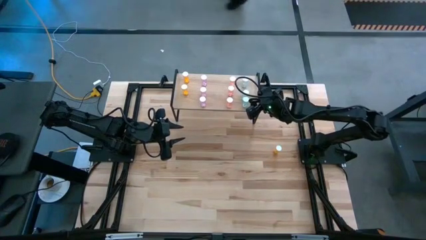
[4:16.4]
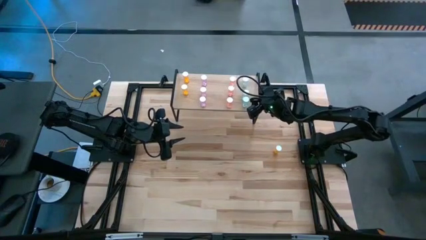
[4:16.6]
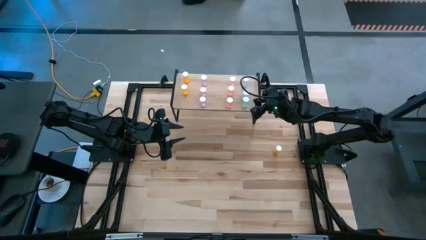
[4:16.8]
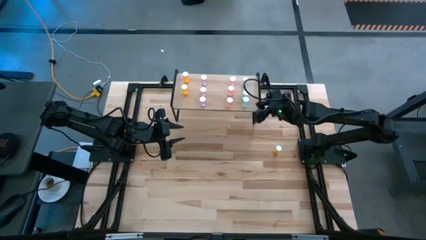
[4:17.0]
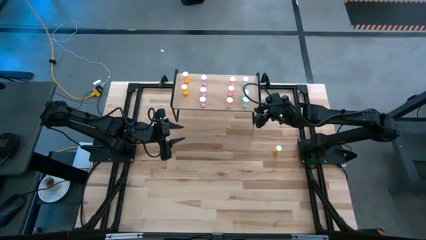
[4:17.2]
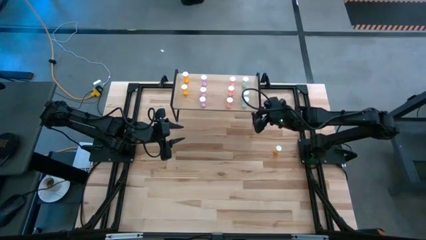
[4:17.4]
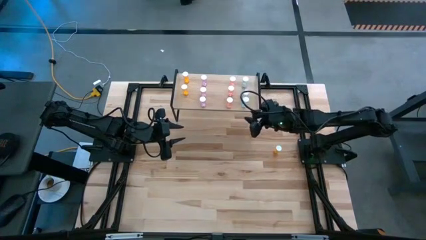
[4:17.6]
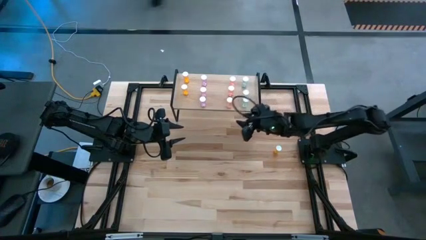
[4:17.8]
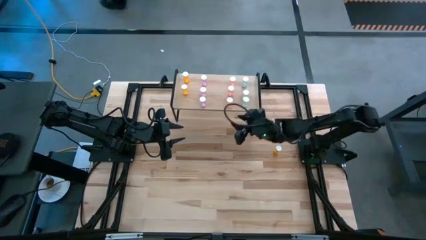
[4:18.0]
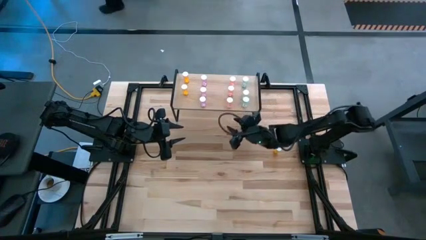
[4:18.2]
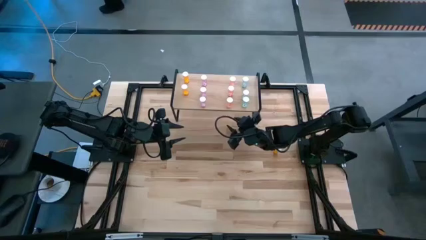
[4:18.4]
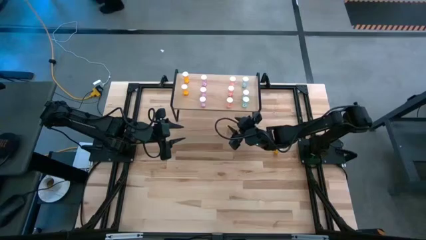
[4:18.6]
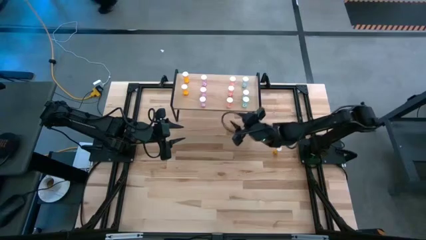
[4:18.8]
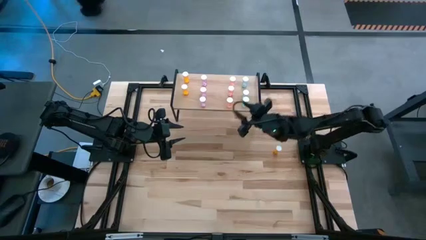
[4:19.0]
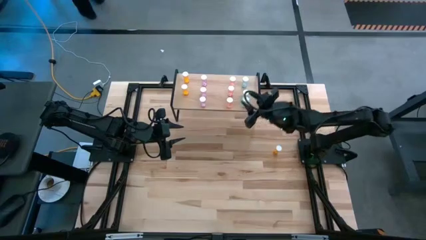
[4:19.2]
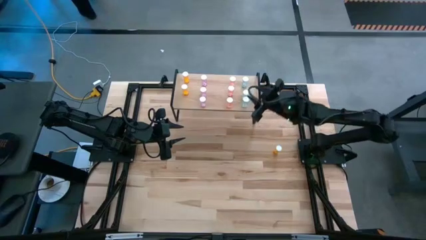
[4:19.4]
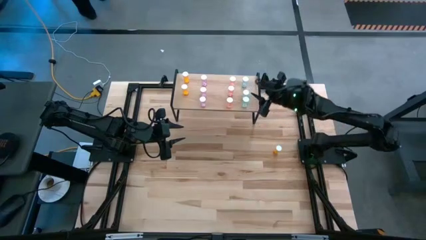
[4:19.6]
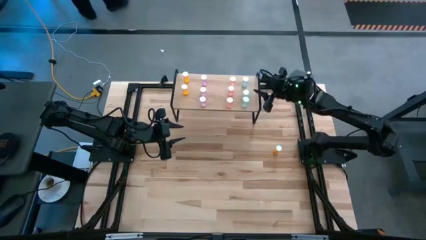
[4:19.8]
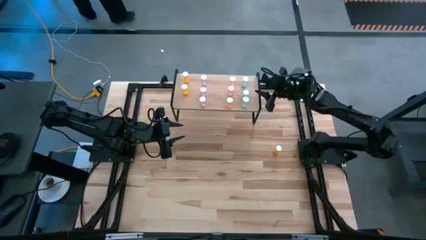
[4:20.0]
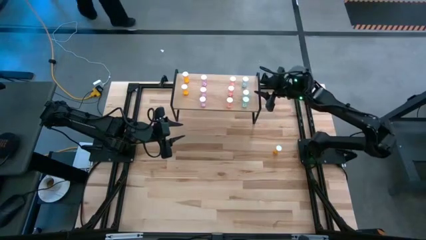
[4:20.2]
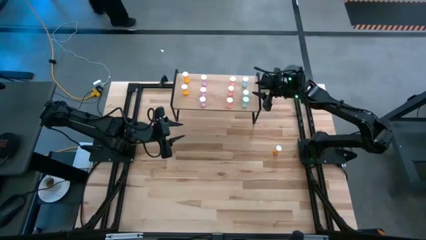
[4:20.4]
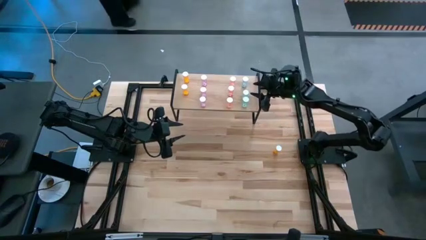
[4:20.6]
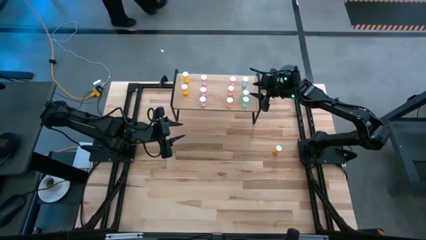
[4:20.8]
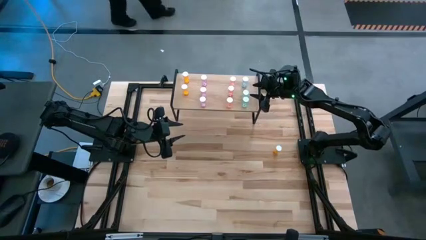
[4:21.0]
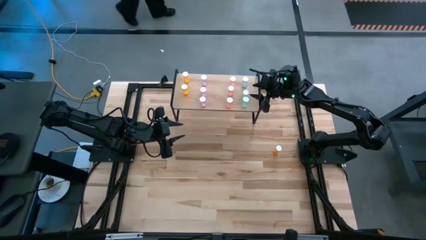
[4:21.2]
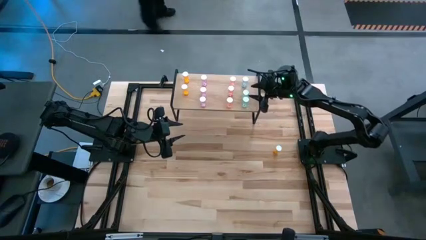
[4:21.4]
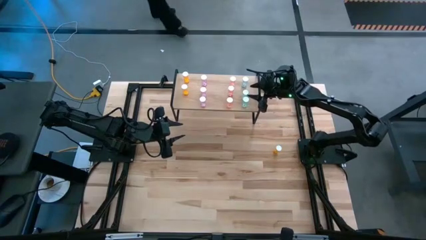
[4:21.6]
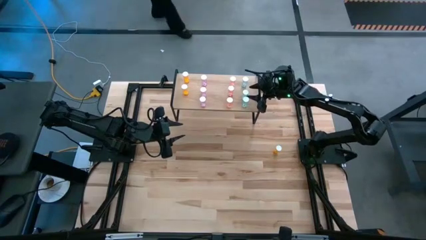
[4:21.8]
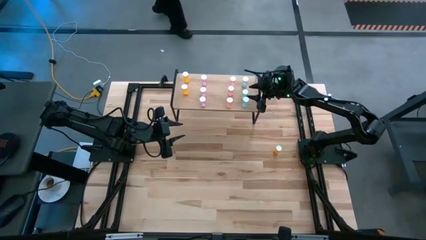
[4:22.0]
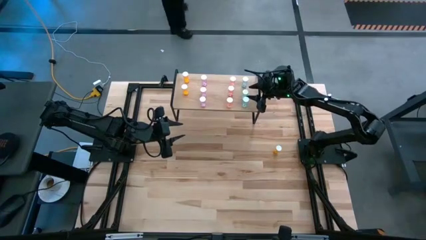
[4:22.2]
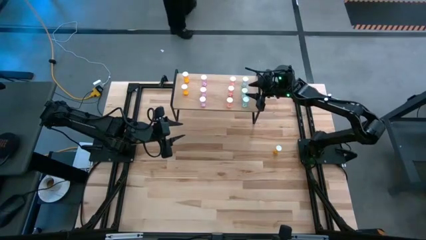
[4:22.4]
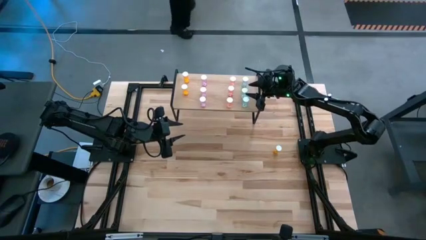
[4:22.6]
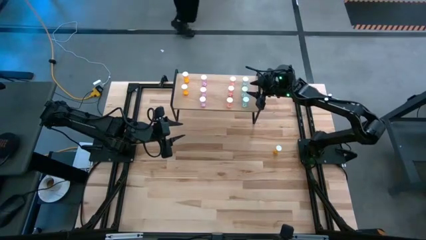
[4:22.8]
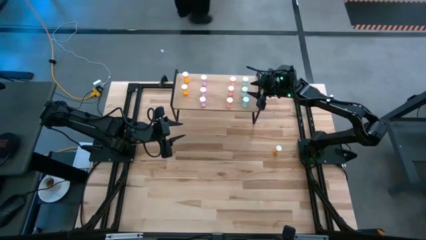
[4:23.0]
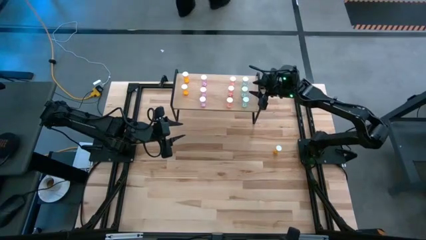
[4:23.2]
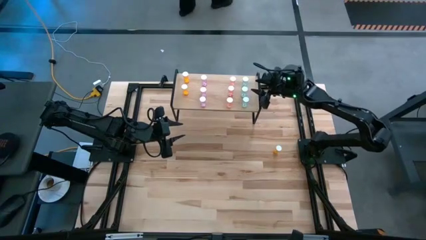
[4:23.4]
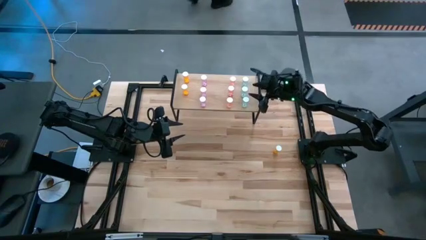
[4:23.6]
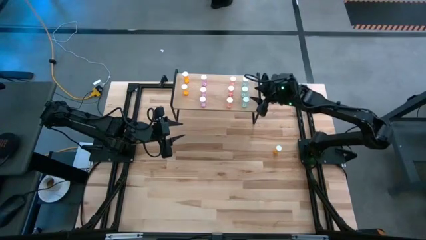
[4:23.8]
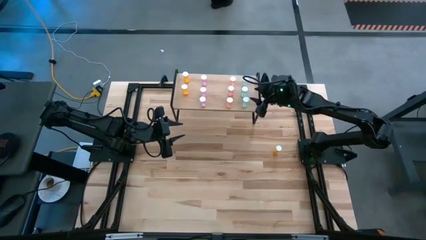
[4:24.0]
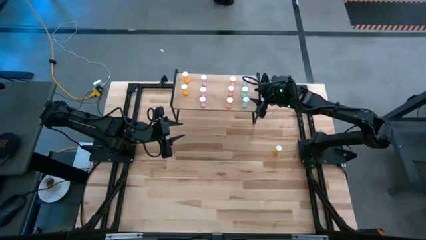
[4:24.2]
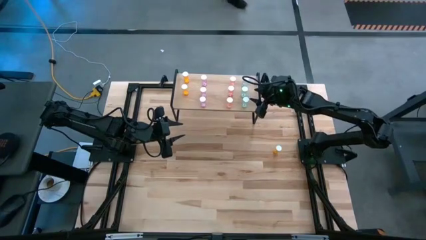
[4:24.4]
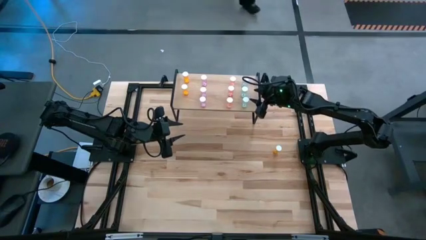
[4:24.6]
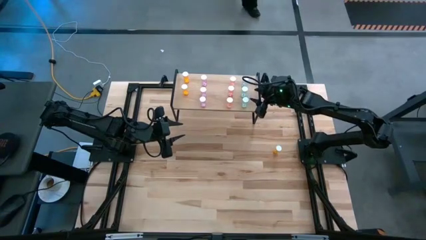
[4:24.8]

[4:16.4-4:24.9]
Task: Pick and place medicine bottles onto shelf by color
Adjust the blue pill bottles on the shelf

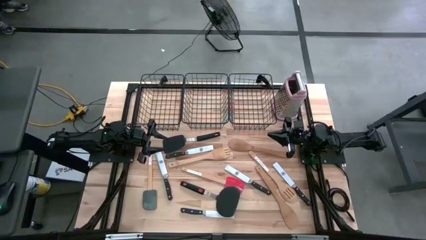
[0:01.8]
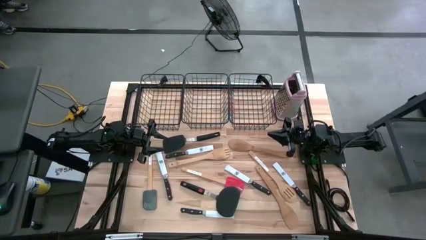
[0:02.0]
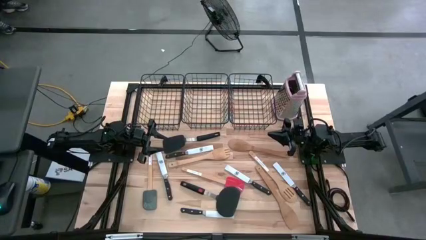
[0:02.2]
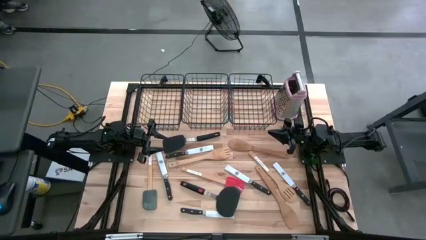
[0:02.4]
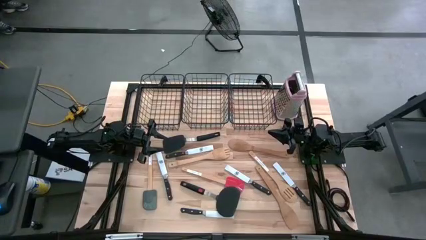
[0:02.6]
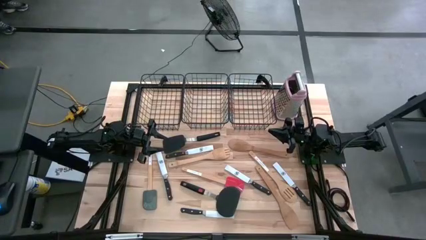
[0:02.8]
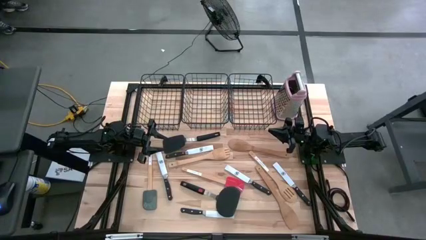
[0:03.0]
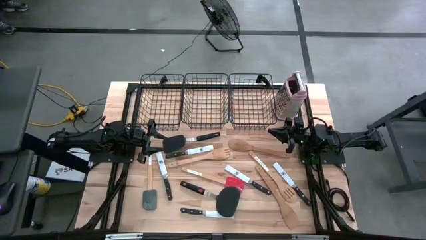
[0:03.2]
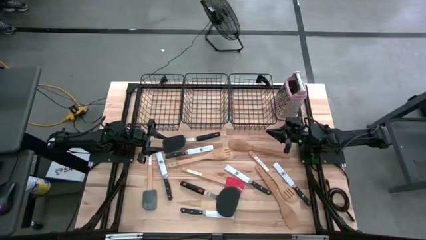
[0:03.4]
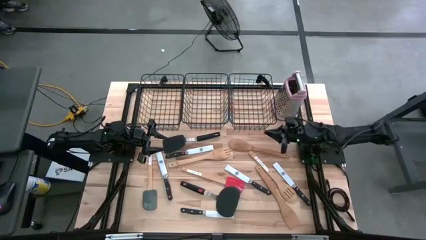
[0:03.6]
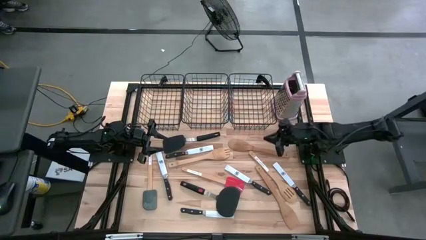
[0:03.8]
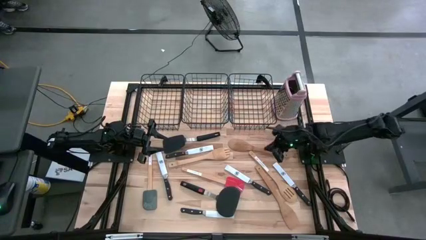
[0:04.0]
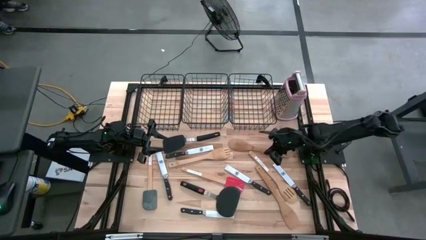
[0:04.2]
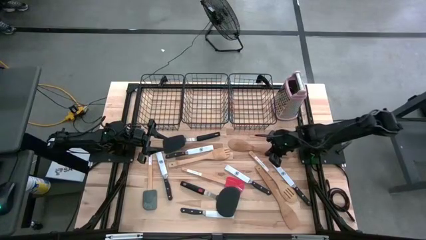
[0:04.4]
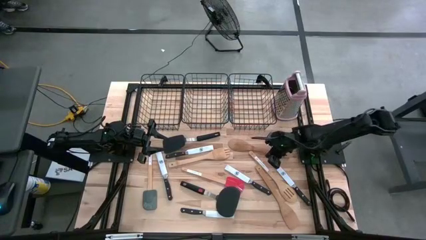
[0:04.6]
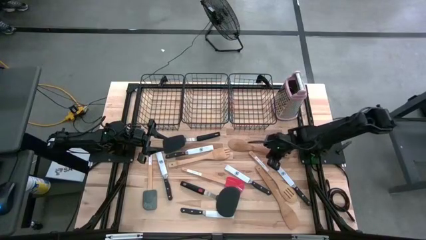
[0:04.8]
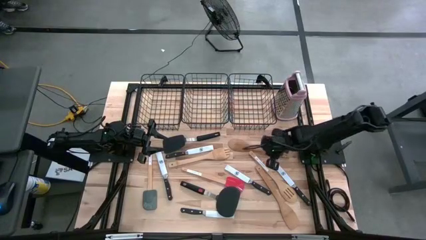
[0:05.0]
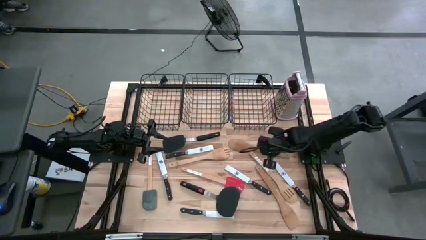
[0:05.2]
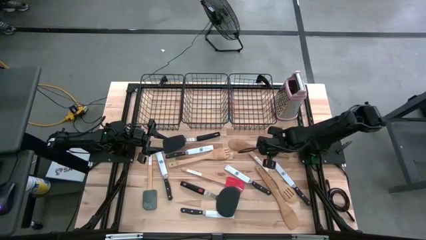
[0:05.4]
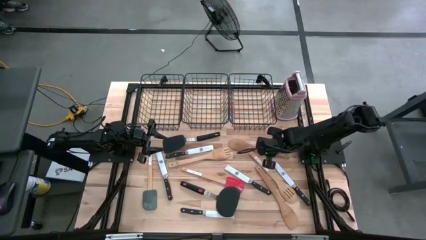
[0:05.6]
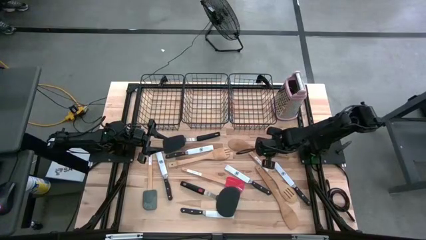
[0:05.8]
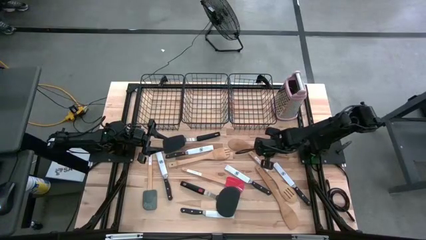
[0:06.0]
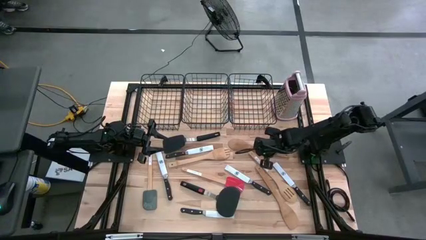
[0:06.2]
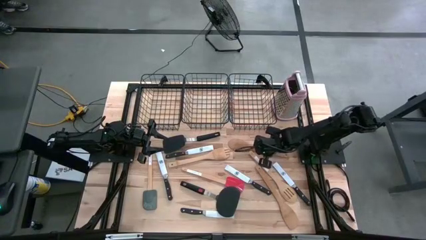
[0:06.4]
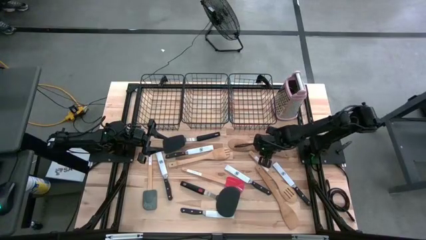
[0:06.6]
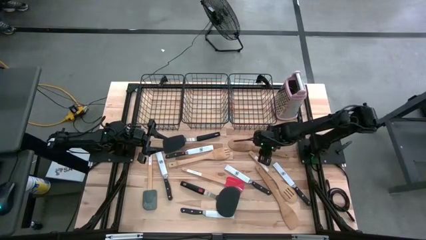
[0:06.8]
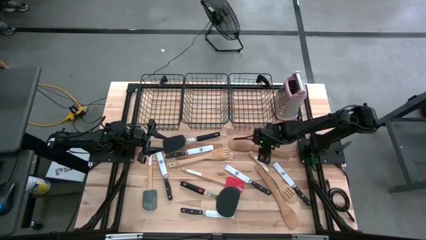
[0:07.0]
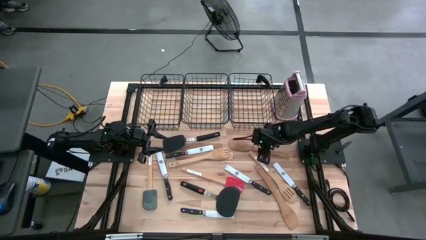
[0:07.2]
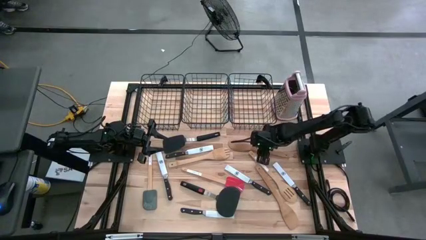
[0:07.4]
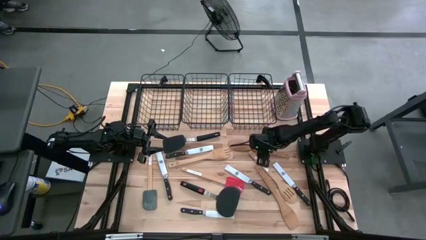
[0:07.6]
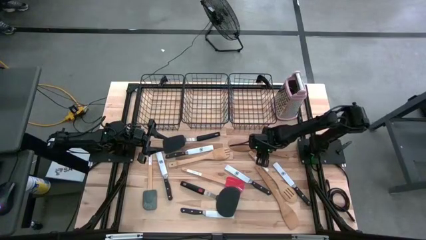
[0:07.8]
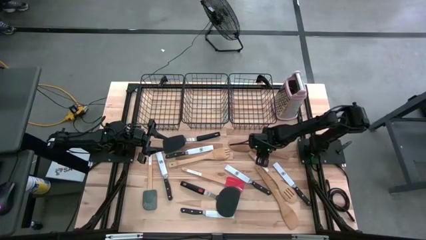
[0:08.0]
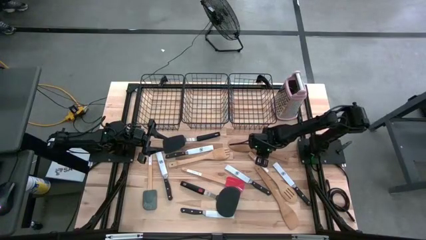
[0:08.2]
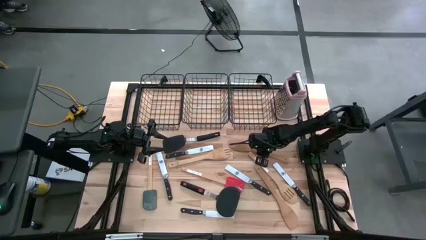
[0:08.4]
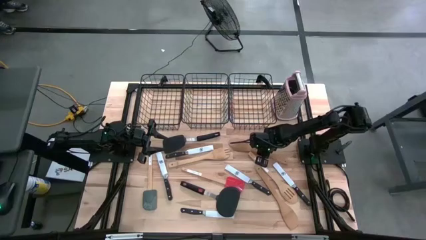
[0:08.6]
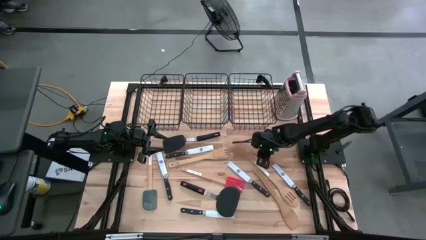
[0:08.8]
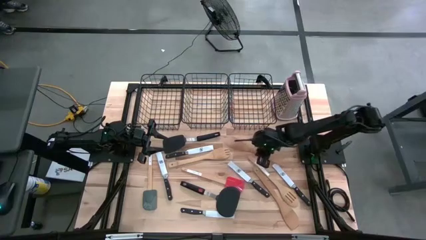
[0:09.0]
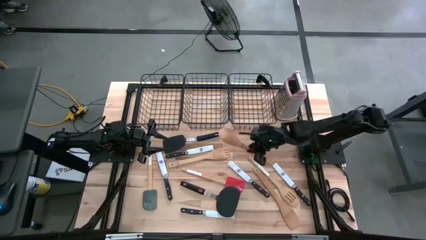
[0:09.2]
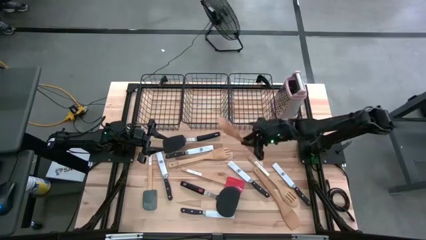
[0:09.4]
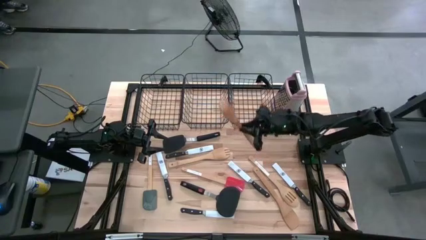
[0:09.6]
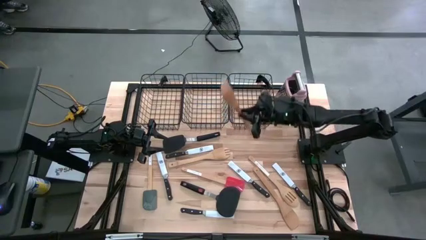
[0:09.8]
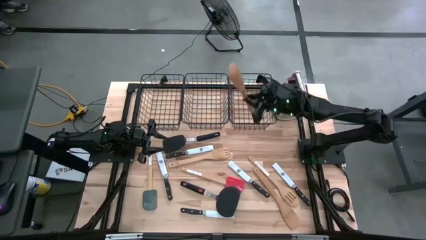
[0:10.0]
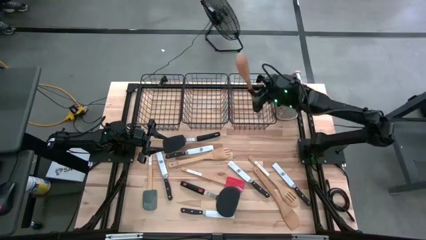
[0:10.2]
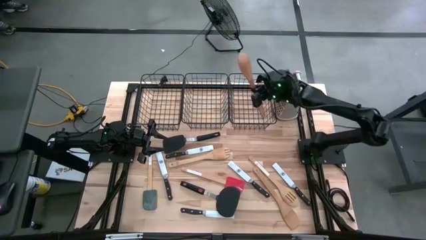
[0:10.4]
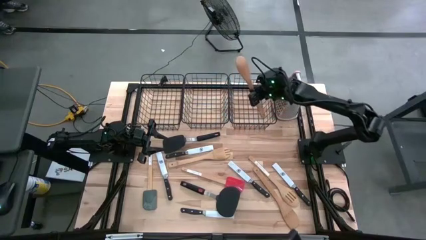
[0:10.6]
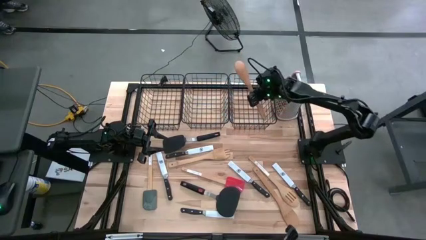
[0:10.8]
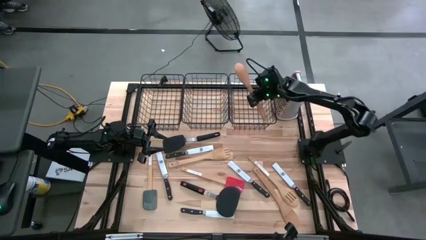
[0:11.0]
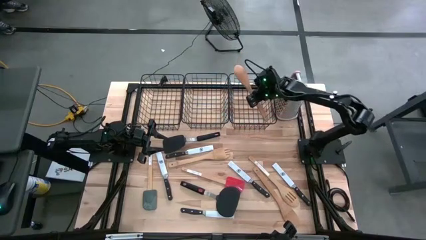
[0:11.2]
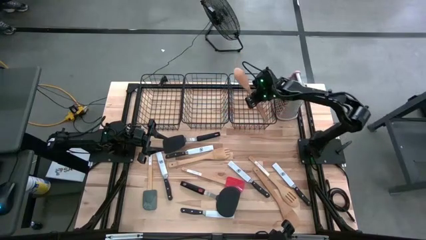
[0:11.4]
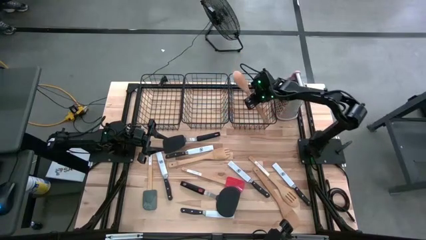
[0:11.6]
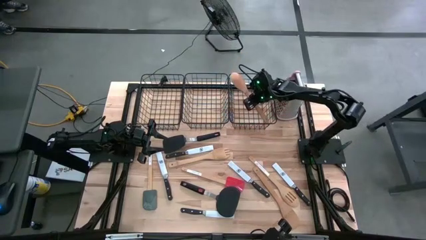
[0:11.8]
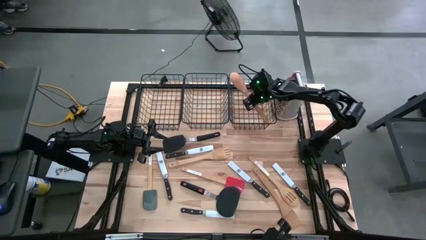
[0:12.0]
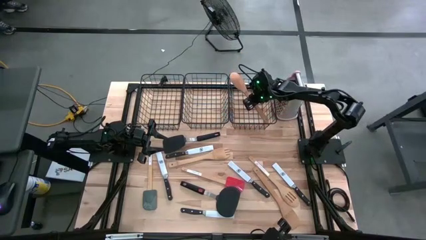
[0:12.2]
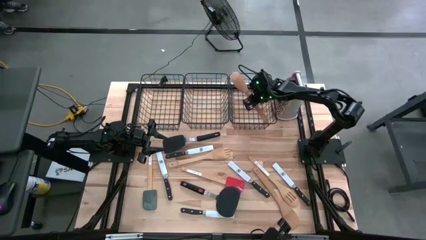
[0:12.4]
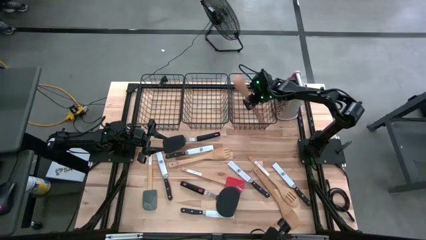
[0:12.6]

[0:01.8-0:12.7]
Task: Pick & Place Kitchen Items
Put the brown serving spoon into the right black wire basket
